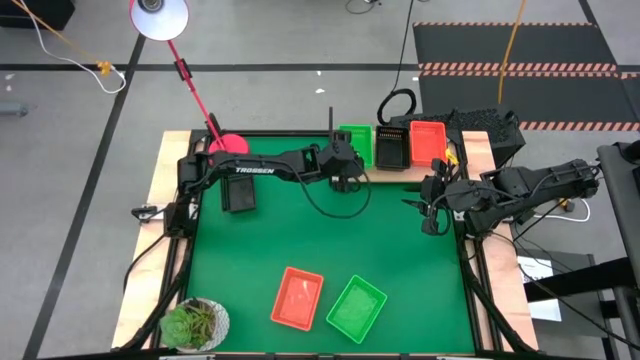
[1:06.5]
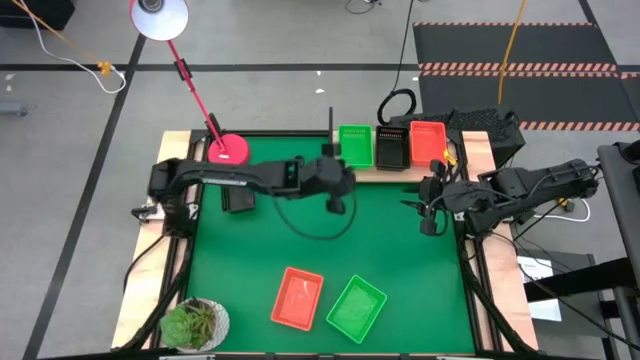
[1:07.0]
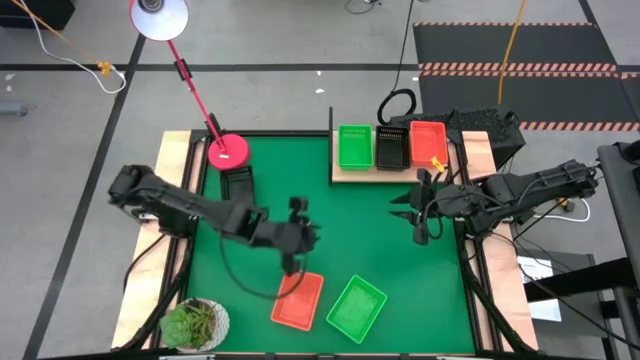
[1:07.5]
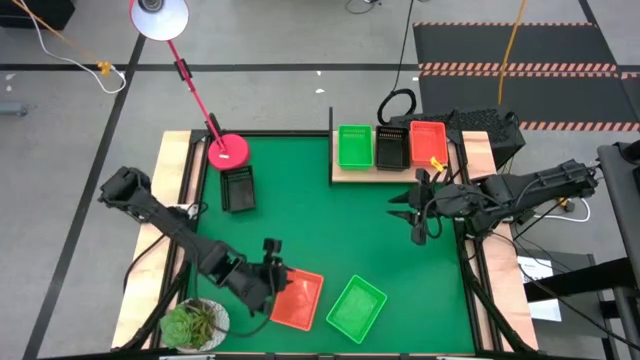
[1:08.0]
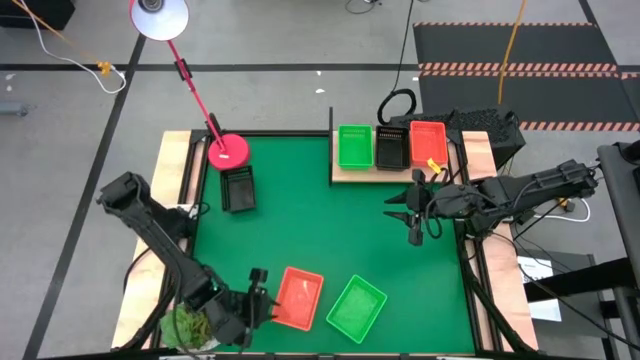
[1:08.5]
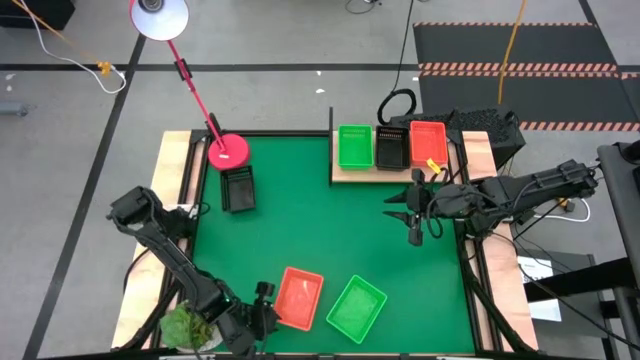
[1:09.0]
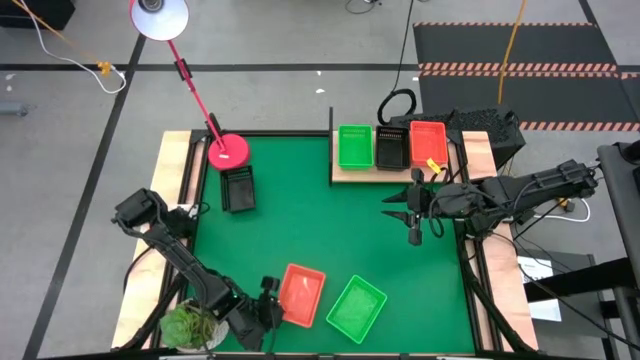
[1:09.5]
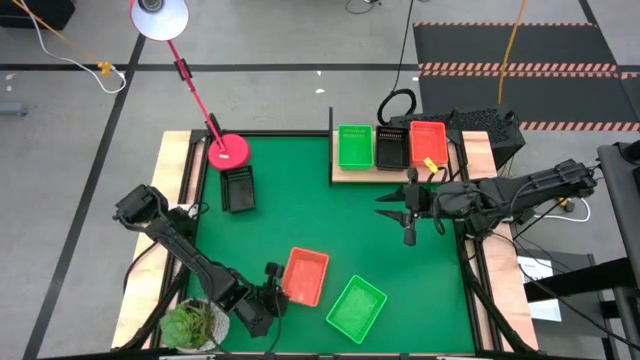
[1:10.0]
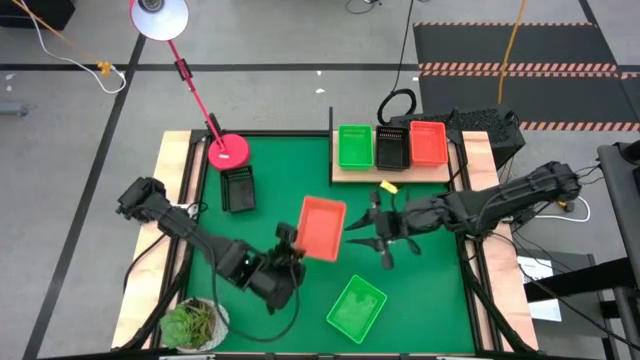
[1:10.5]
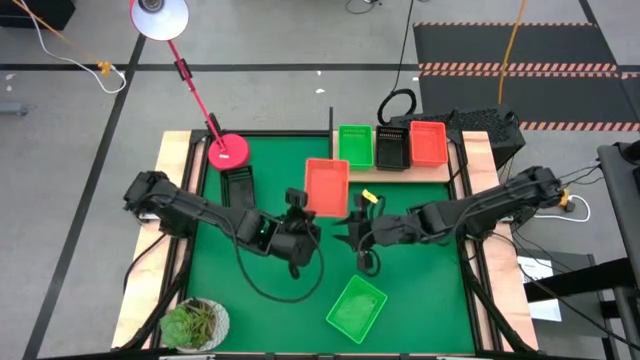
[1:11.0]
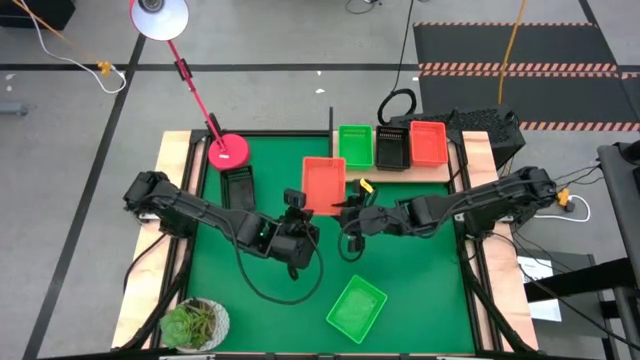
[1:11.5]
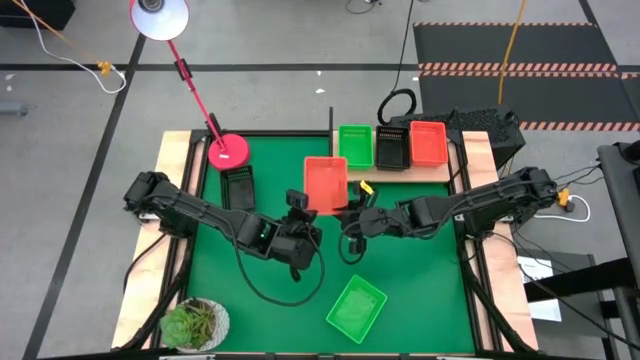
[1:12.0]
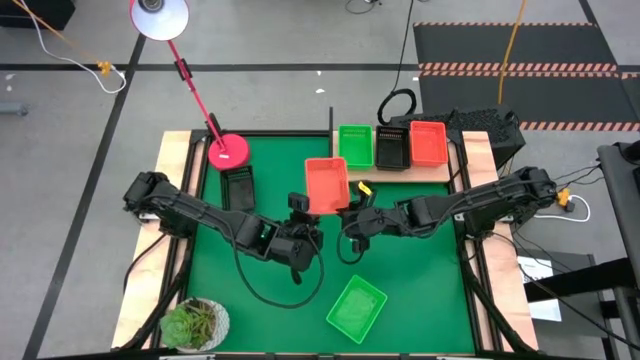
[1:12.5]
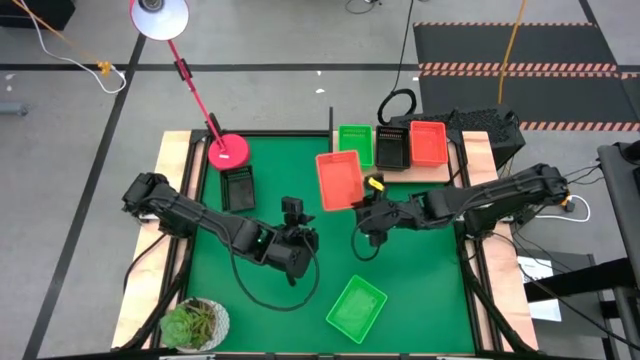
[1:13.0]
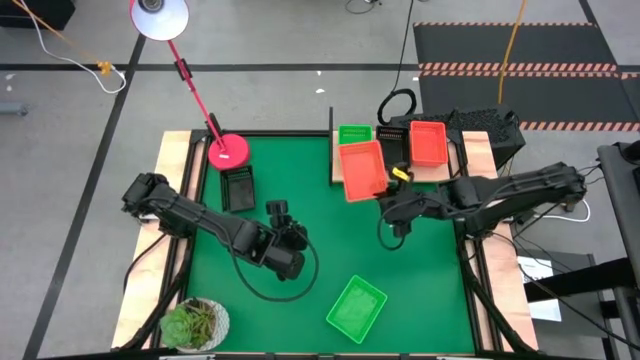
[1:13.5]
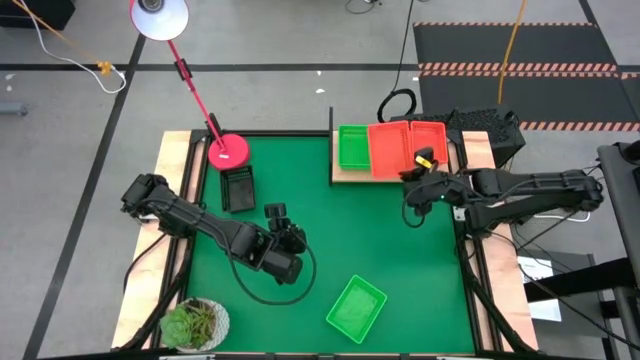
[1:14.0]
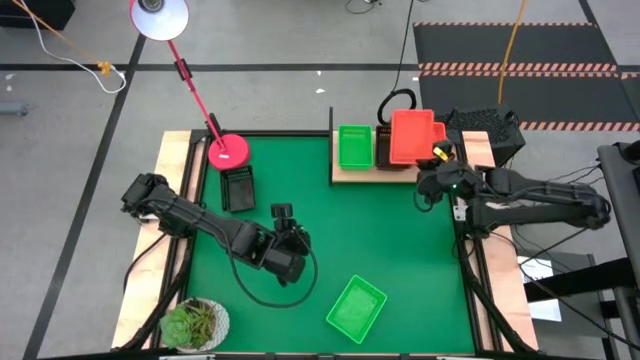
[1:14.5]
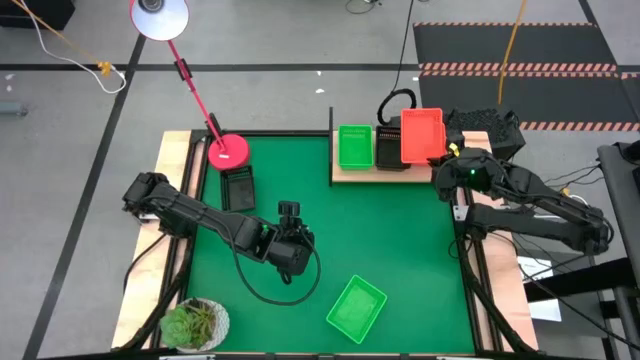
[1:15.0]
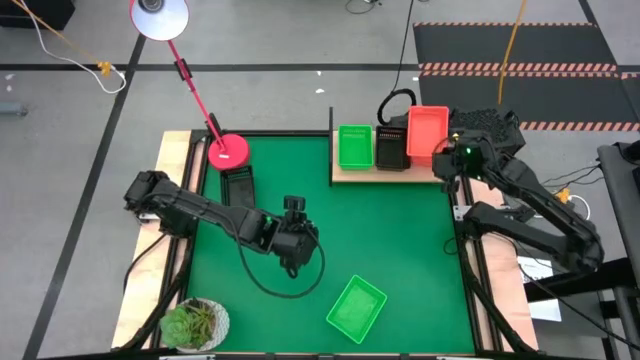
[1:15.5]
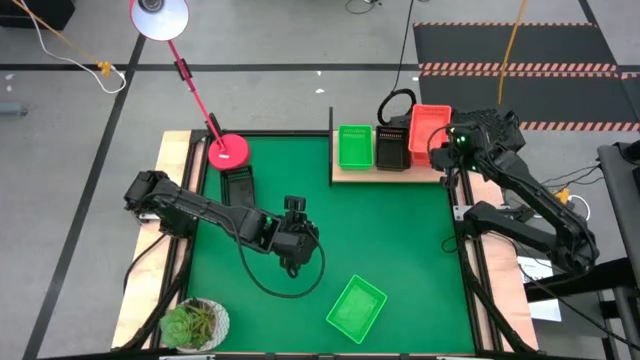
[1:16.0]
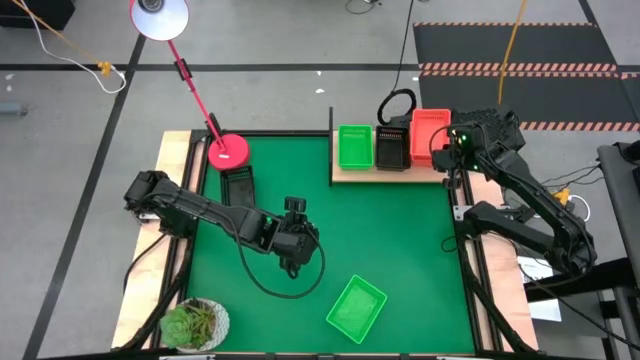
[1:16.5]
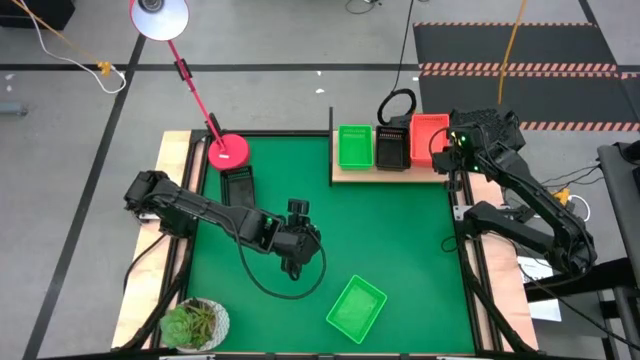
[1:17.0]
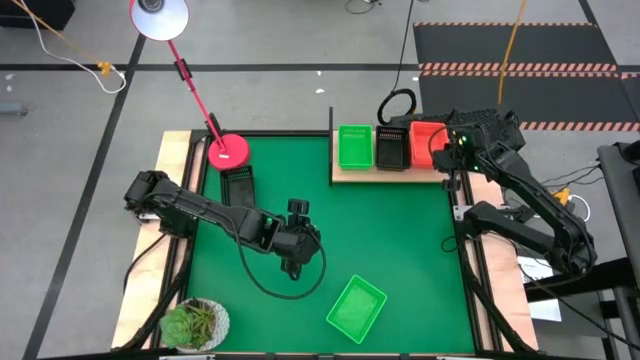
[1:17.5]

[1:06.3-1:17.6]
Task: Stack baskets on shelf by color
Stack the orange bin on top of the other orange bin on the shelf

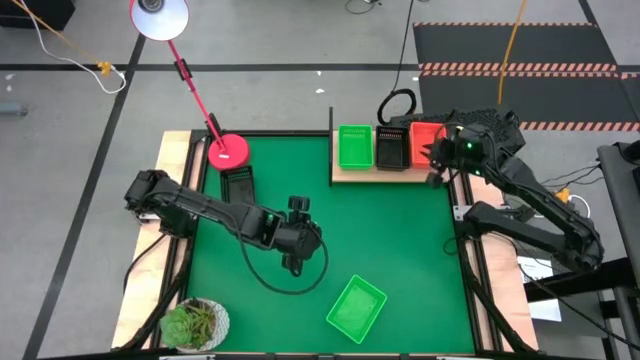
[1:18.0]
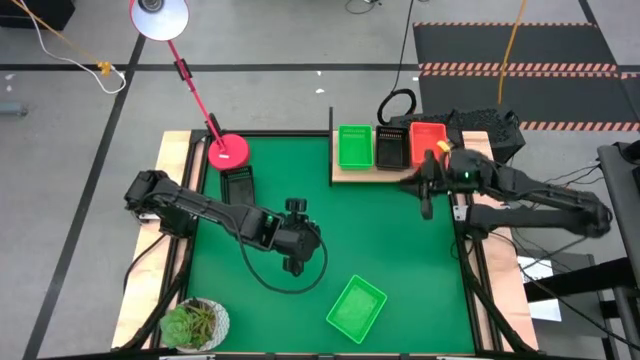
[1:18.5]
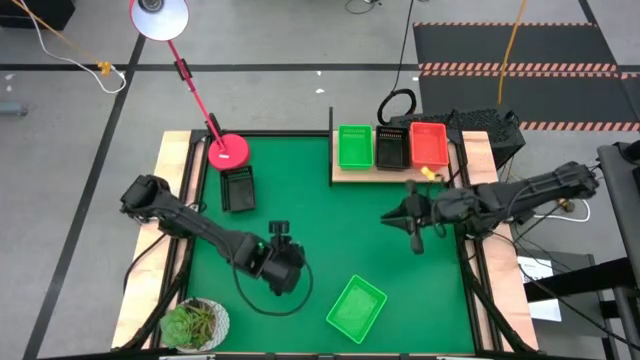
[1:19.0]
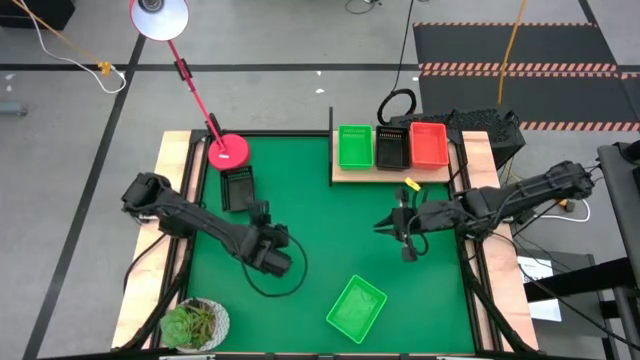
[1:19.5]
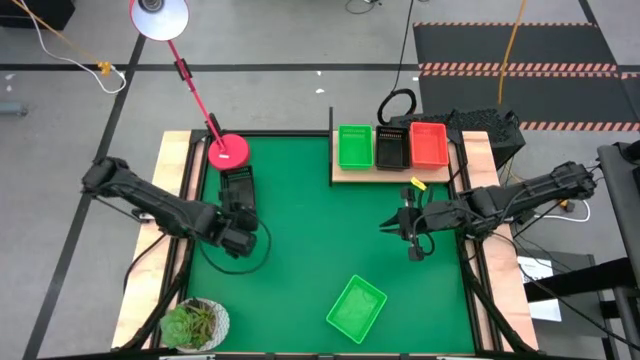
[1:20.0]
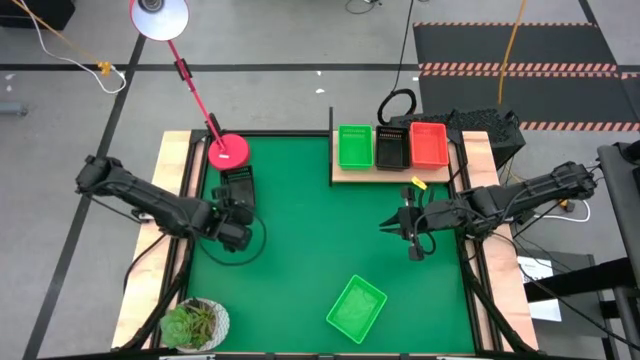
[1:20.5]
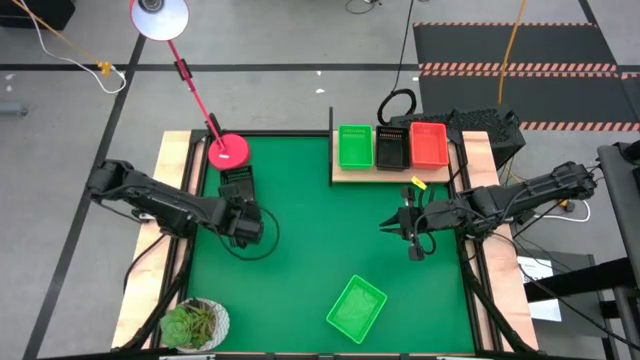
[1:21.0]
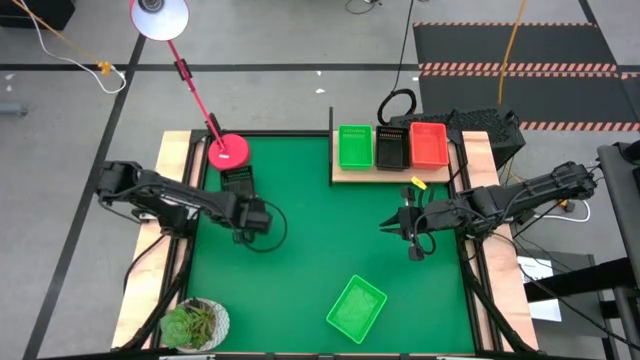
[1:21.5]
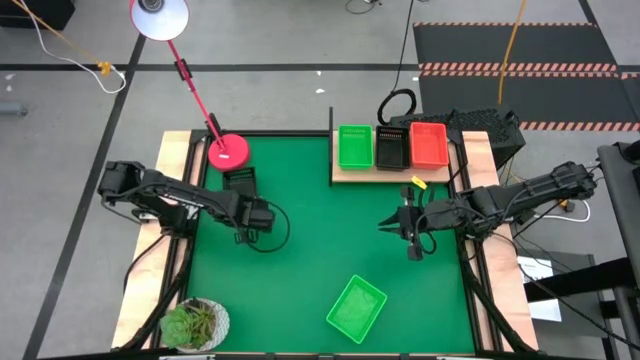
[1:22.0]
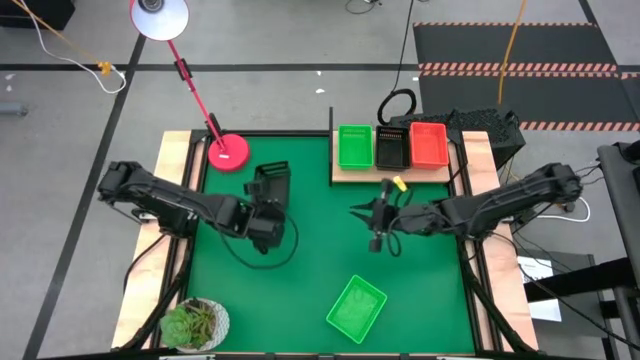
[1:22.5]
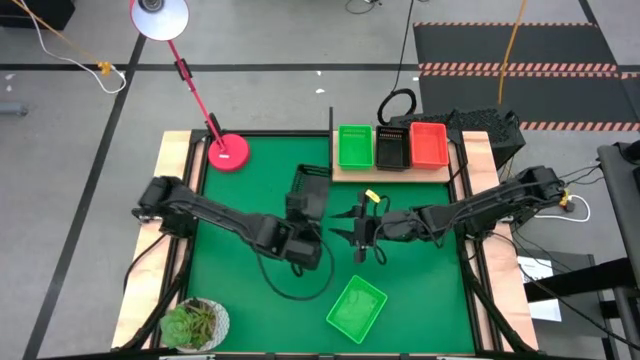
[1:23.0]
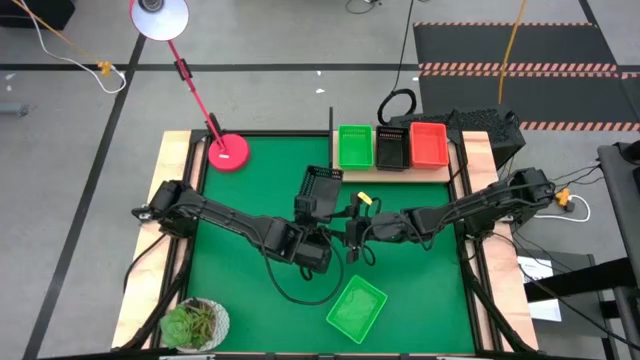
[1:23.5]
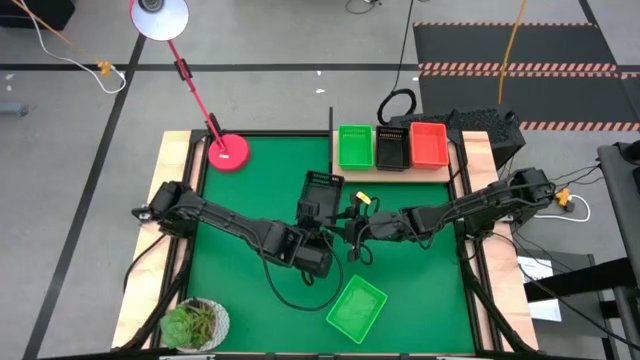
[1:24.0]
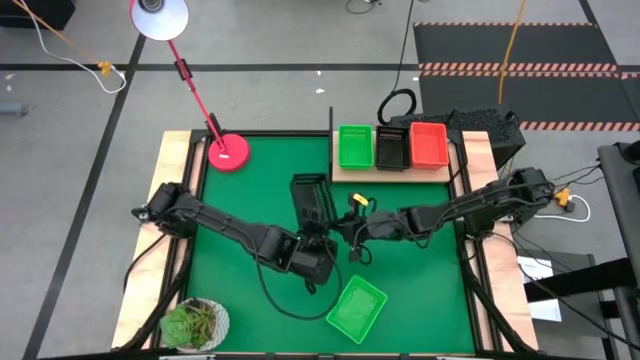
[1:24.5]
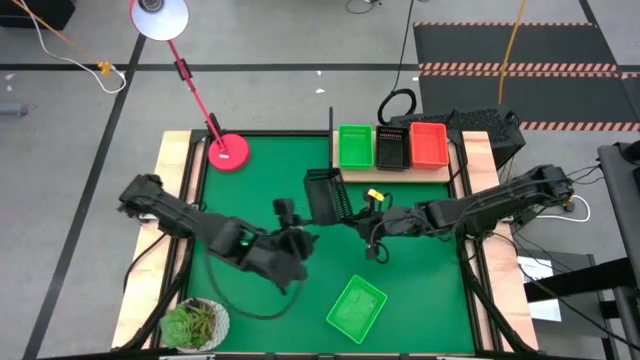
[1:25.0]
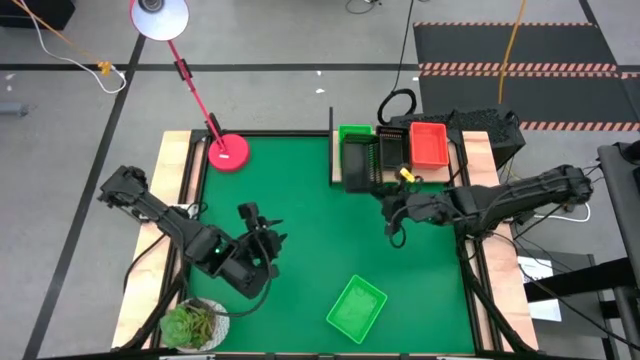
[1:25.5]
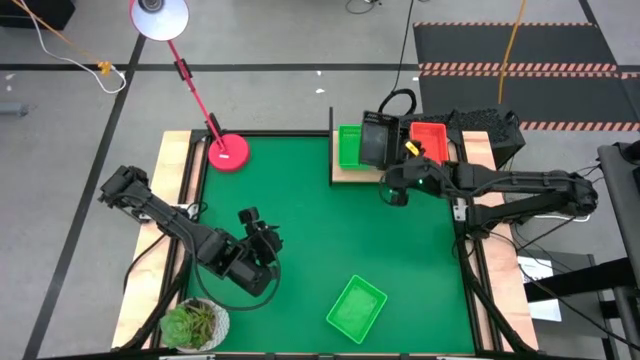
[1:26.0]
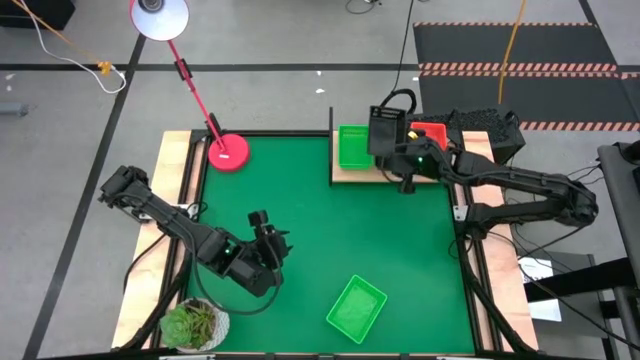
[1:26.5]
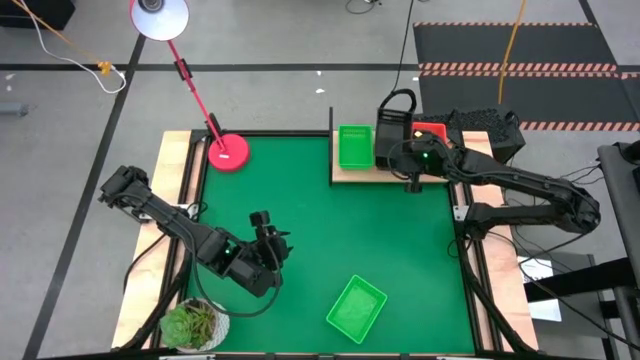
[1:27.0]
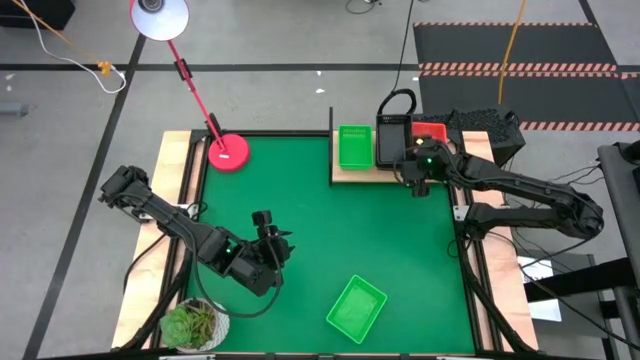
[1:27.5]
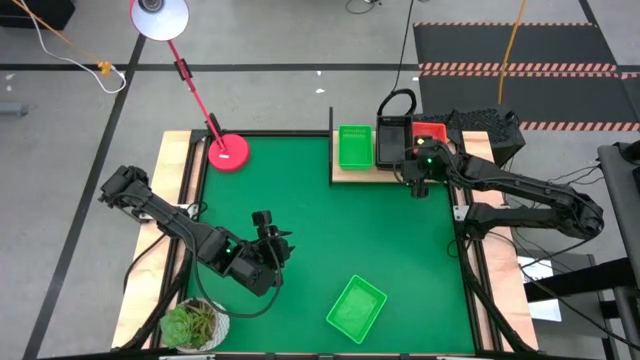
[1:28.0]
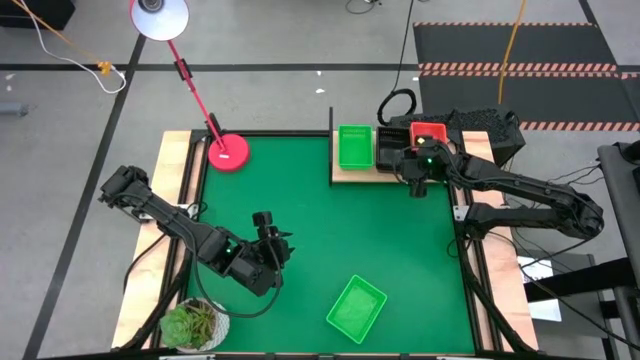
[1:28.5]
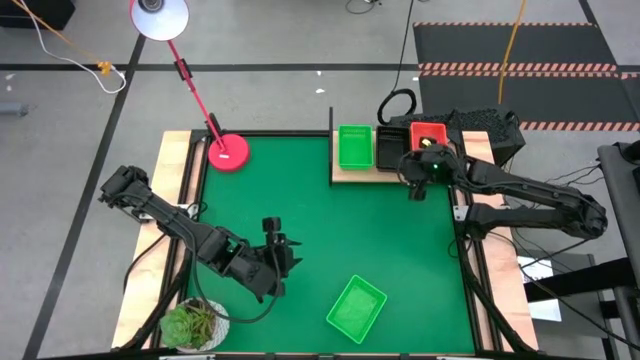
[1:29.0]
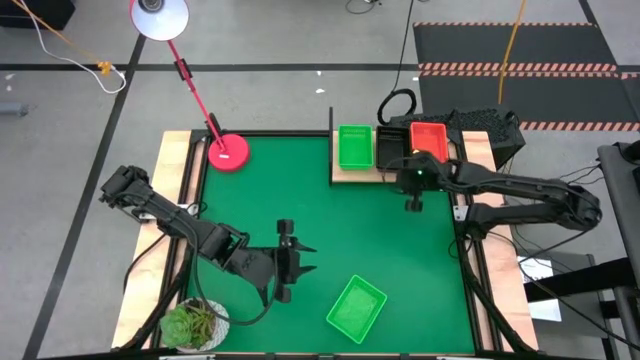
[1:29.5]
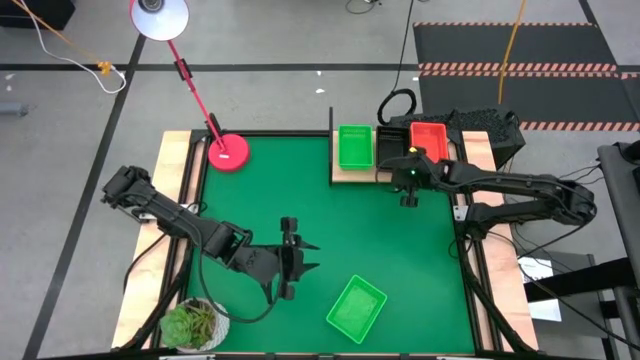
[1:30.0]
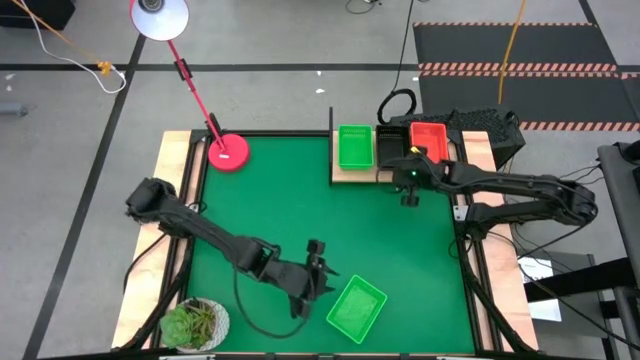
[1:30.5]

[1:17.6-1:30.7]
Stack the black bin on top of the other black bin on the shelf
